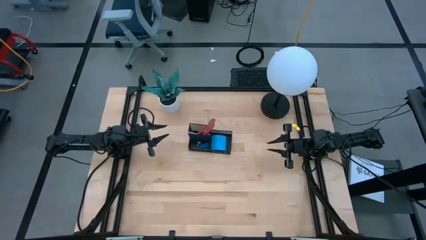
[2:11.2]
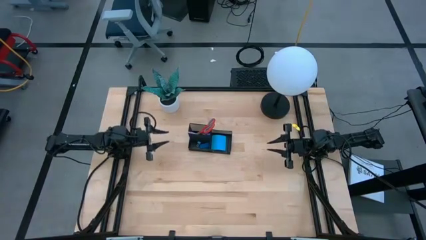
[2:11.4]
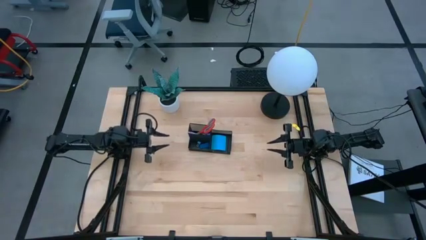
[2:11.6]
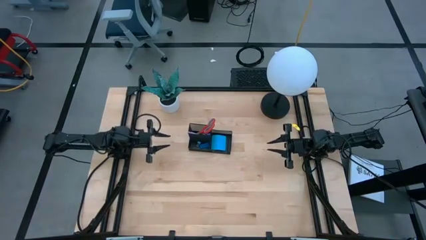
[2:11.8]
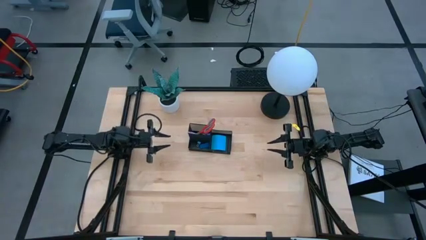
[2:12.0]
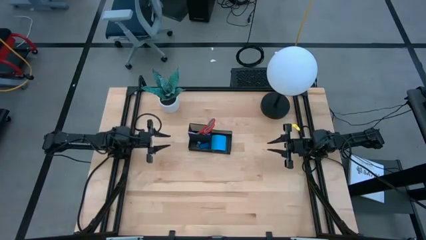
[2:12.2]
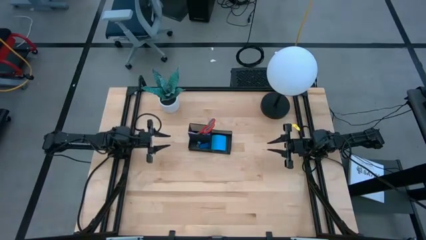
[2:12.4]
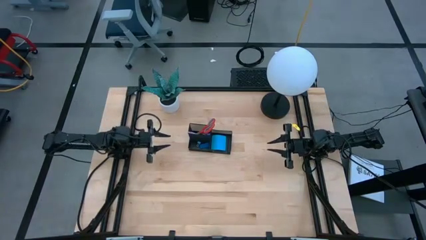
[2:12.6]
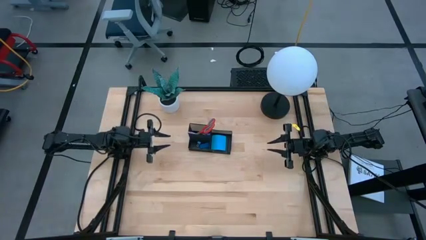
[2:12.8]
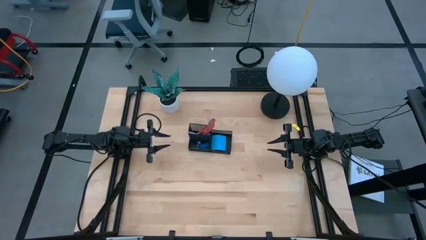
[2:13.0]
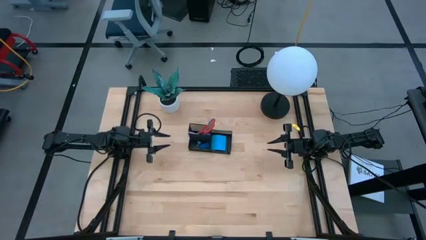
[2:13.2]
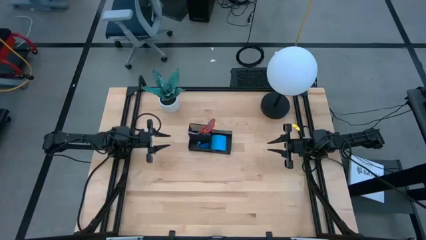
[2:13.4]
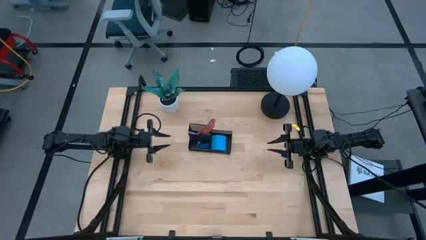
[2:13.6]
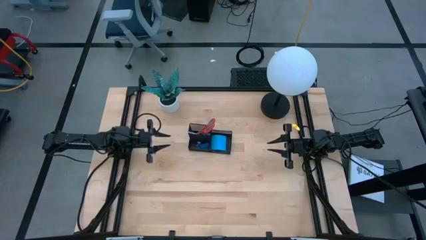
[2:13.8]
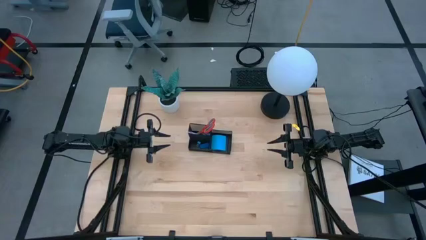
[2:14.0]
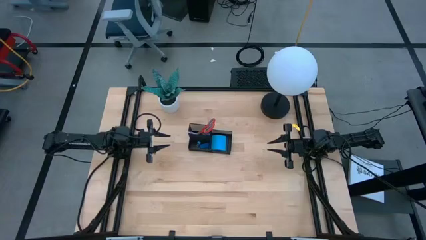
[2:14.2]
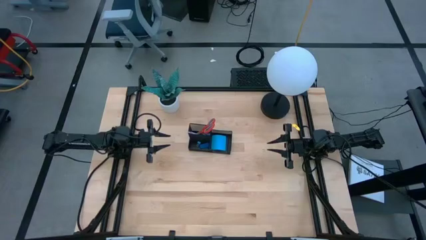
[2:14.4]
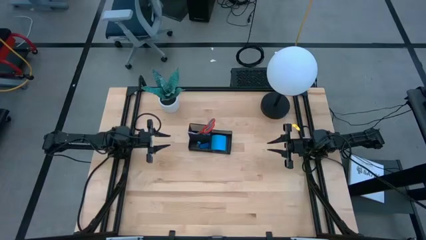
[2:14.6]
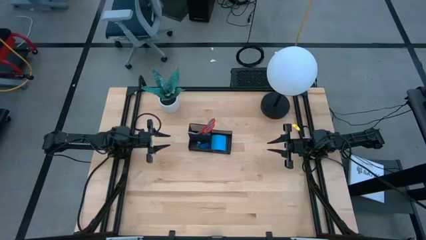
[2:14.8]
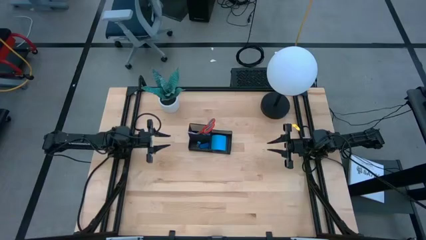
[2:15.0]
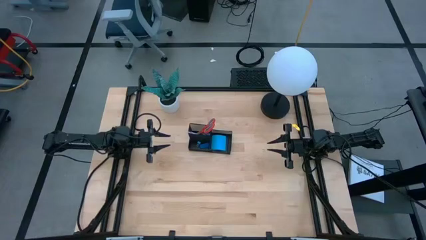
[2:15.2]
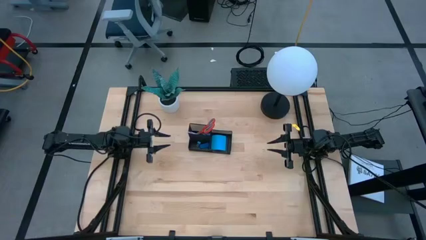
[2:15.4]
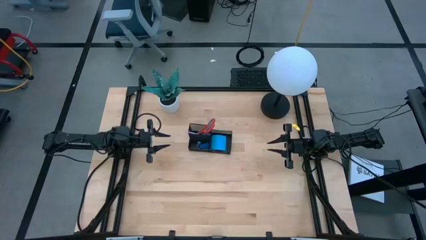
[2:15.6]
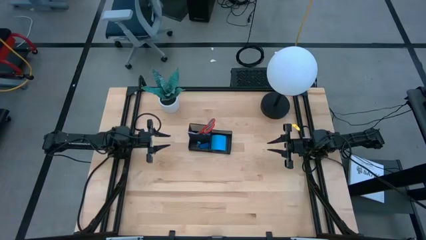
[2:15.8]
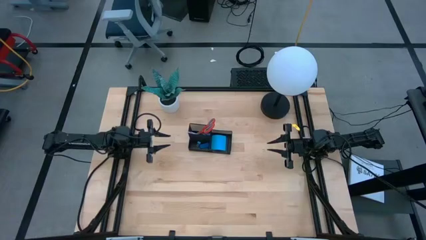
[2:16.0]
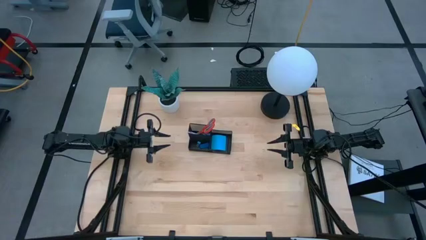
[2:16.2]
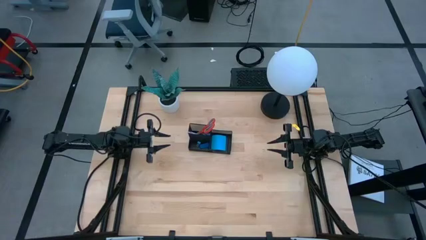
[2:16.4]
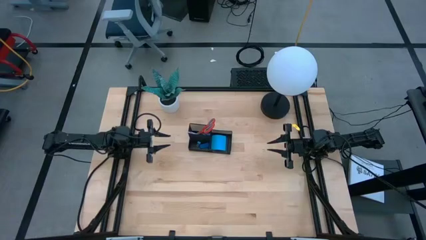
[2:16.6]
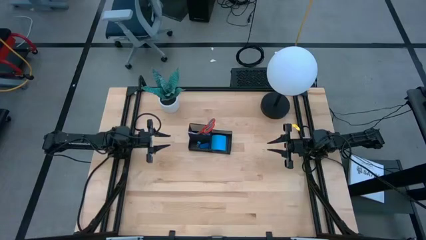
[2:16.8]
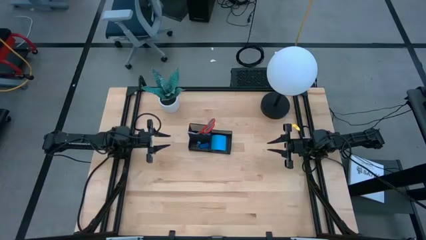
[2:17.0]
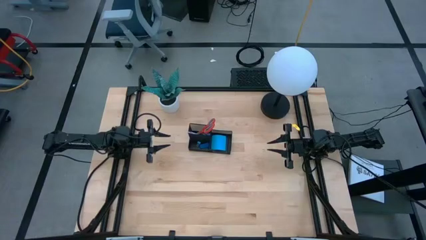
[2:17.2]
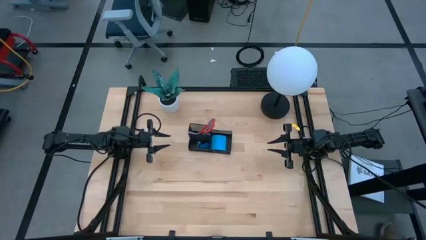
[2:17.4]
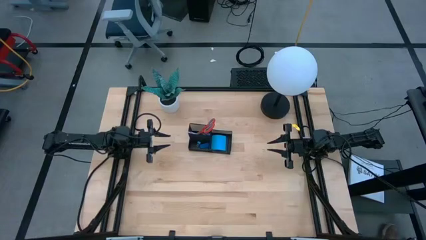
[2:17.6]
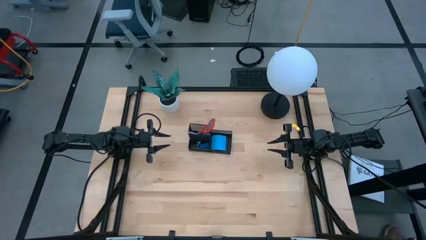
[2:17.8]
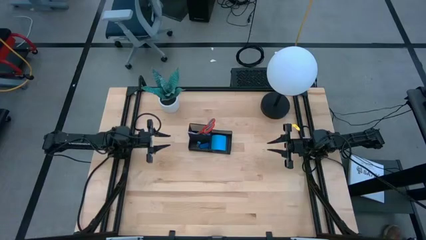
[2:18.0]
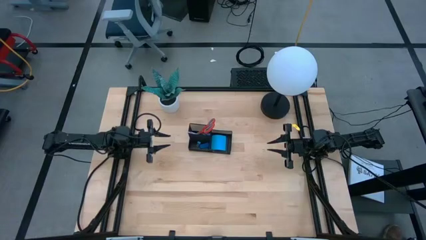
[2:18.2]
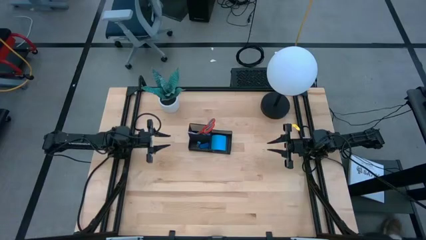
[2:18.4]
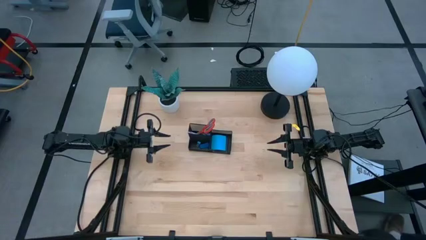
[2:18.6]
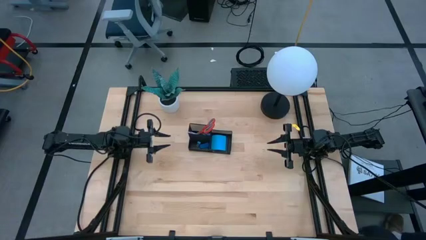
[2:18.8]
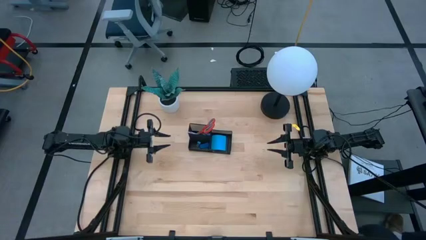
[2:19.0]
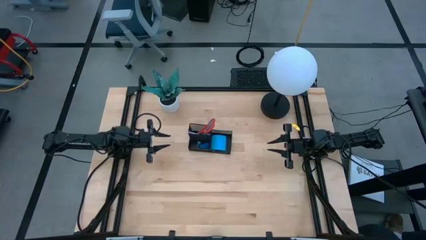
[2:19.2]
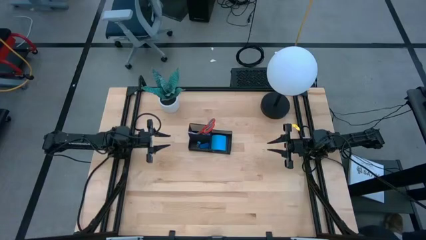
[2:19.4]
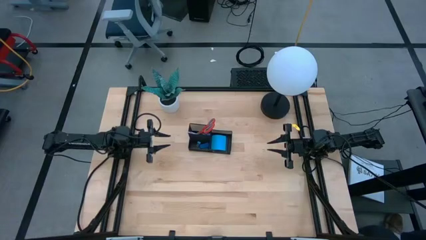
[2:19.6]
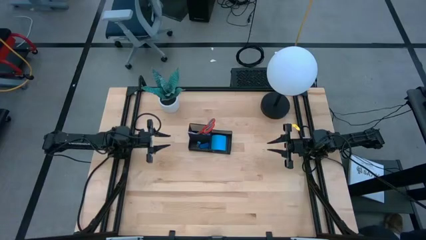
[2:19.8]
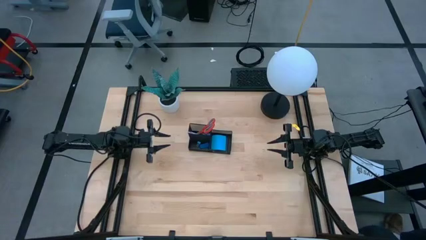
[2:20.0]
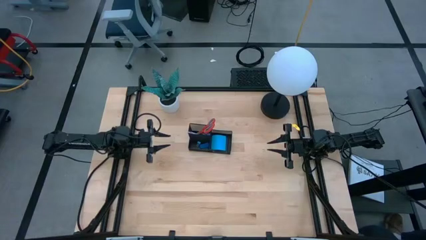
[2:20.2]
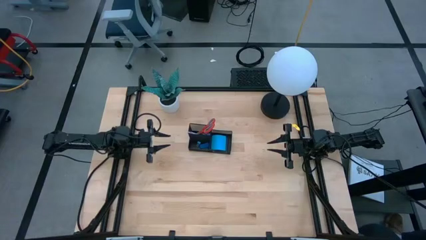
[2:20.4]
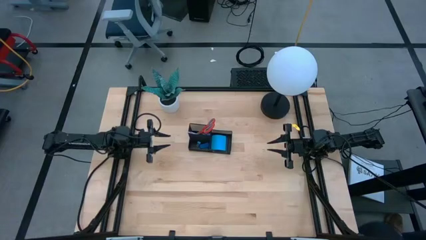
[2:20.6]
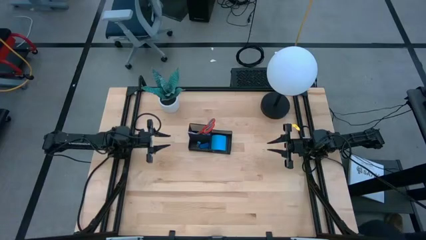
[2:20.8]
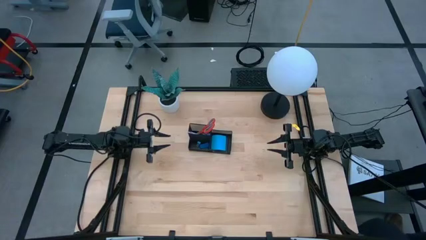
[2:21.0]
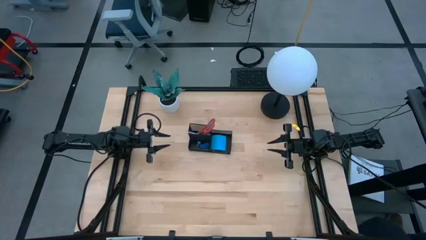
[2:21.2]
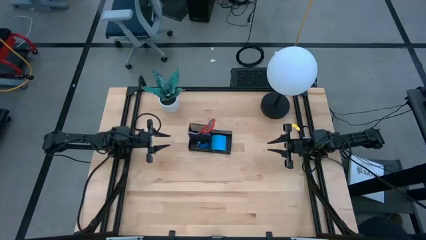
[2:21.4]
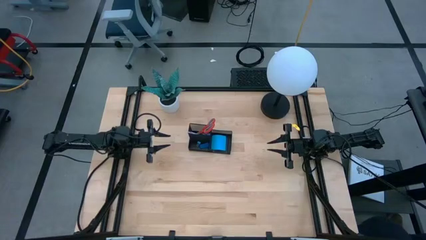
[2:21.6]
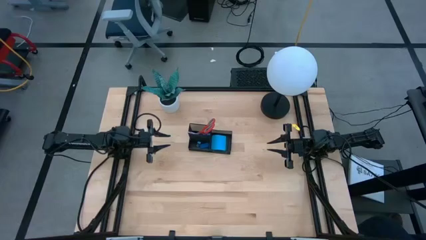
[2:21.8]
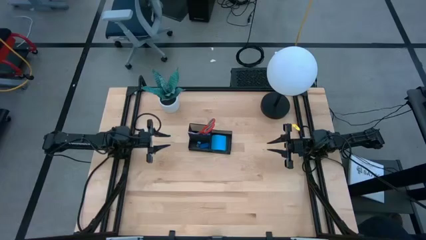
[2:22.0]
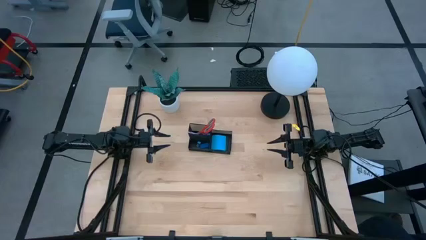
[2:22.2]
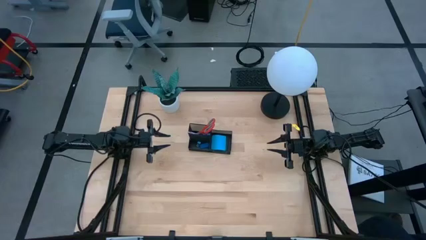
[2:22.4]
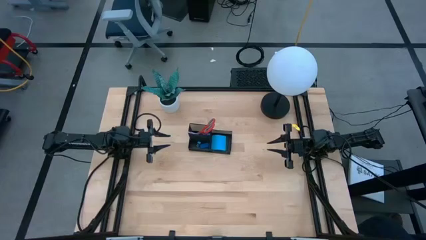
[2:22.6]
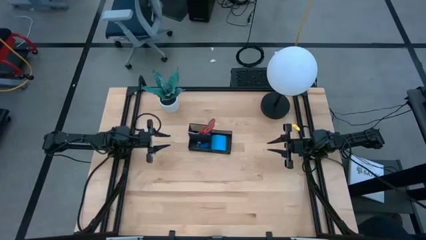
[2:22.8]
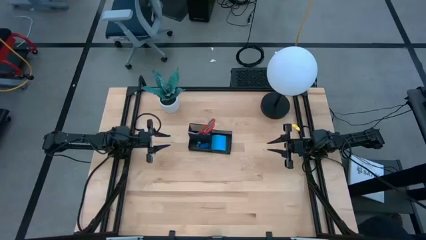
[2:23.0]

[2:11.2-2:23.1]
Task: Pick and place office supplies into organizer
Return to Home Position
